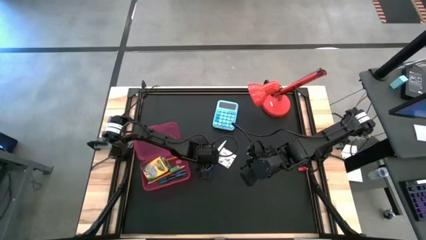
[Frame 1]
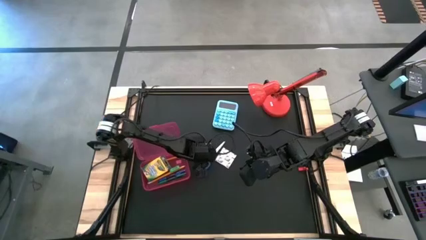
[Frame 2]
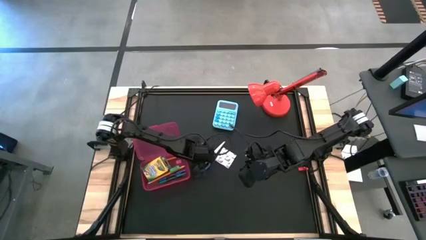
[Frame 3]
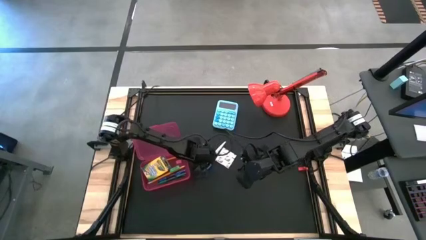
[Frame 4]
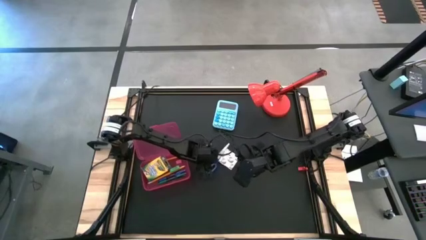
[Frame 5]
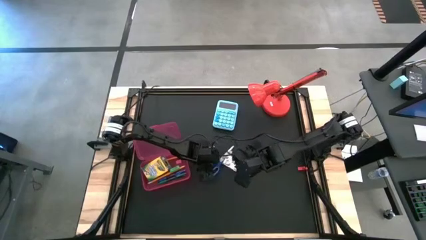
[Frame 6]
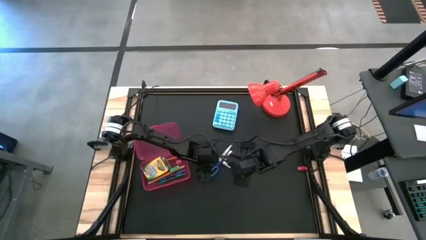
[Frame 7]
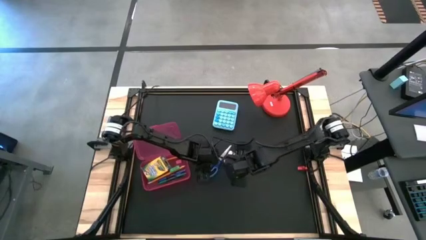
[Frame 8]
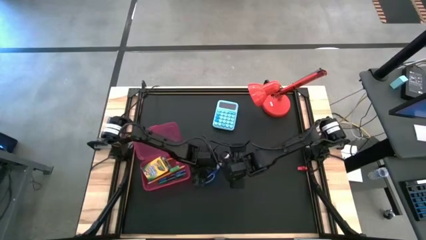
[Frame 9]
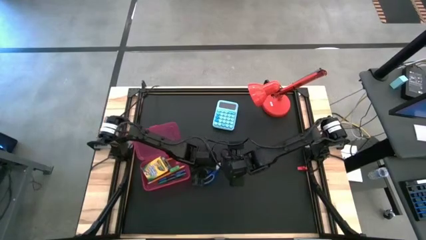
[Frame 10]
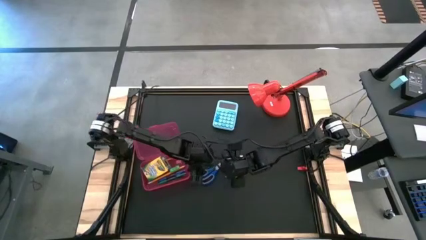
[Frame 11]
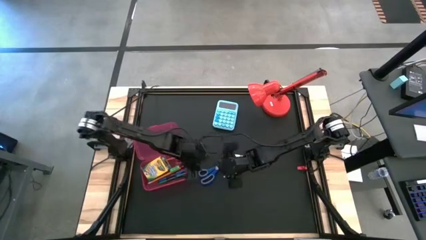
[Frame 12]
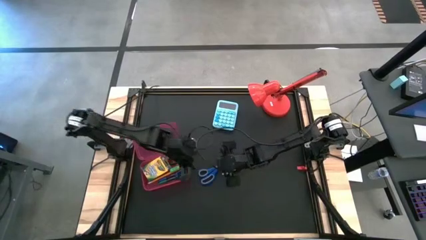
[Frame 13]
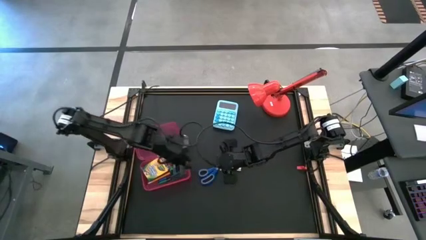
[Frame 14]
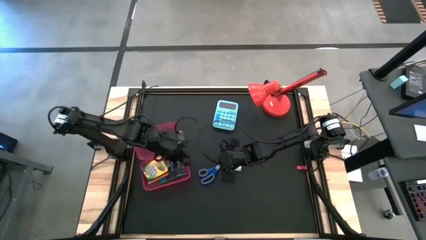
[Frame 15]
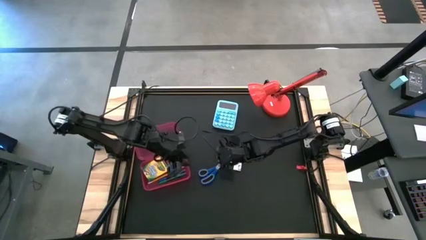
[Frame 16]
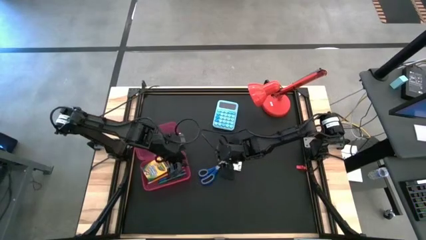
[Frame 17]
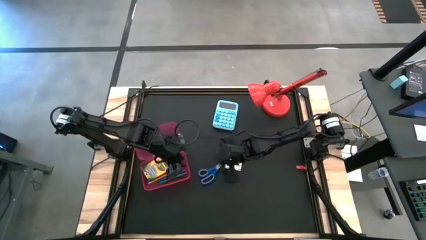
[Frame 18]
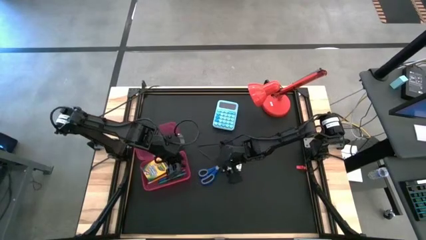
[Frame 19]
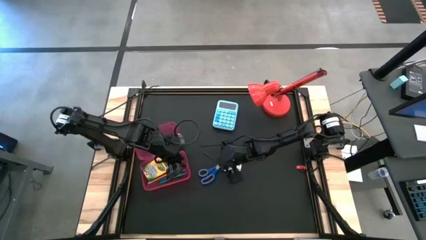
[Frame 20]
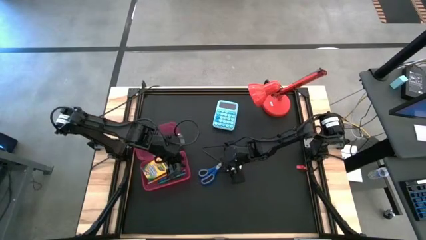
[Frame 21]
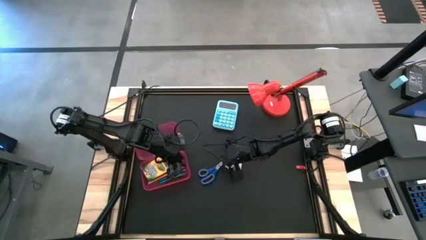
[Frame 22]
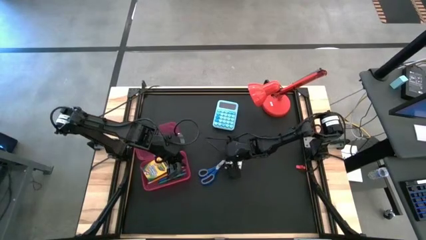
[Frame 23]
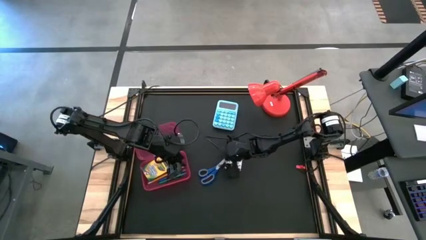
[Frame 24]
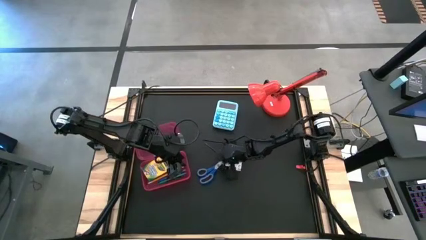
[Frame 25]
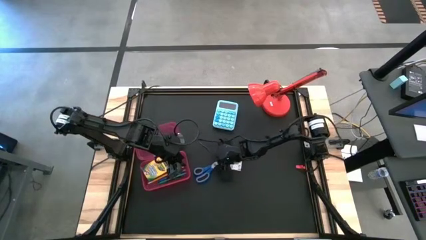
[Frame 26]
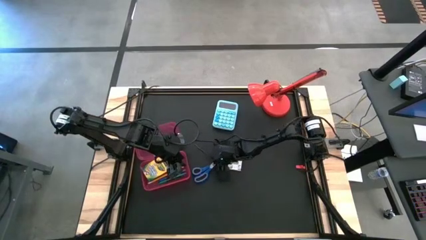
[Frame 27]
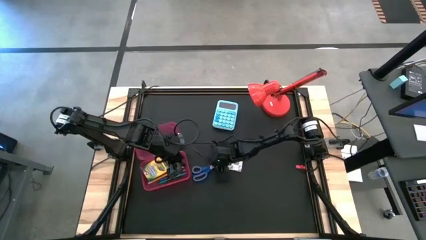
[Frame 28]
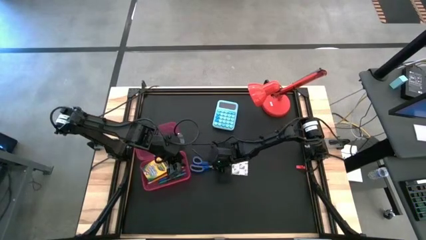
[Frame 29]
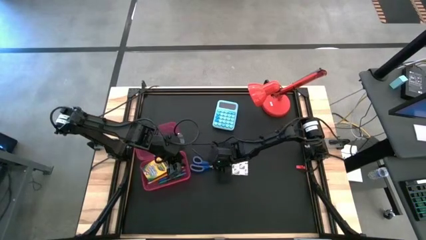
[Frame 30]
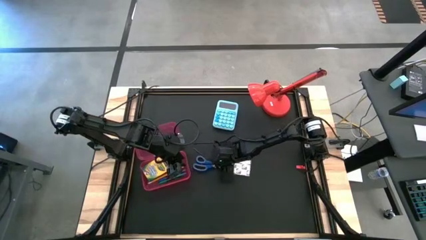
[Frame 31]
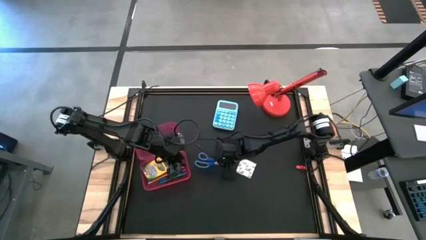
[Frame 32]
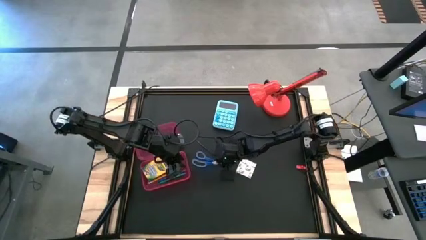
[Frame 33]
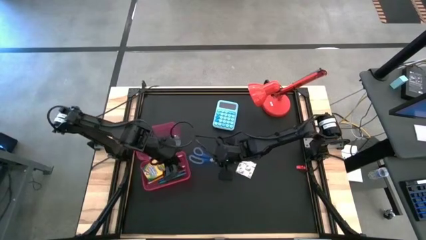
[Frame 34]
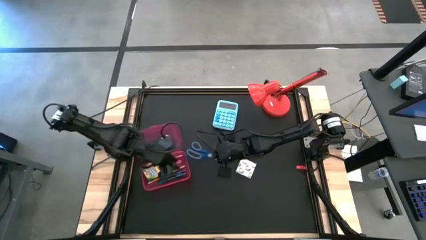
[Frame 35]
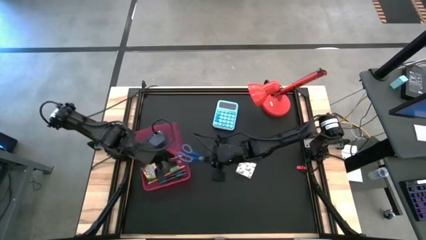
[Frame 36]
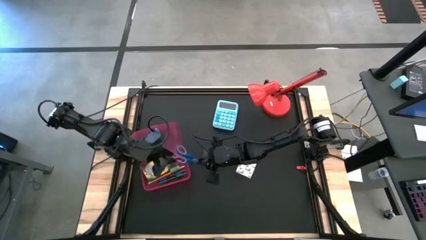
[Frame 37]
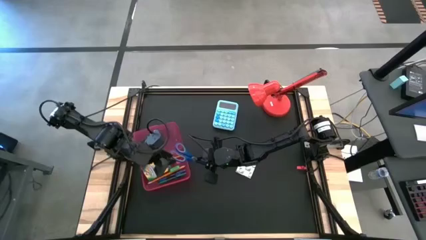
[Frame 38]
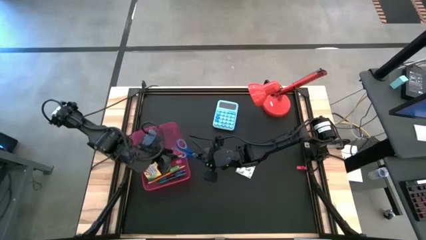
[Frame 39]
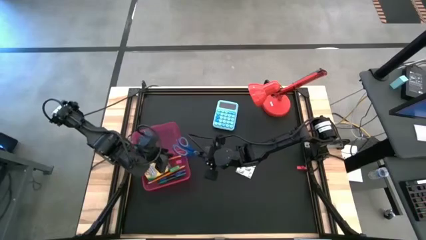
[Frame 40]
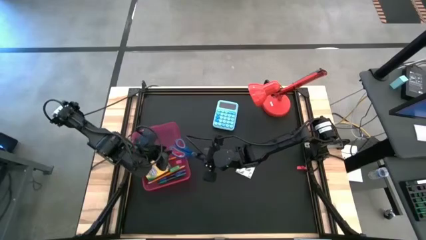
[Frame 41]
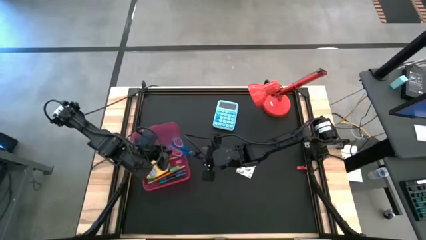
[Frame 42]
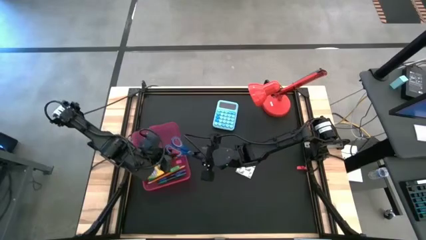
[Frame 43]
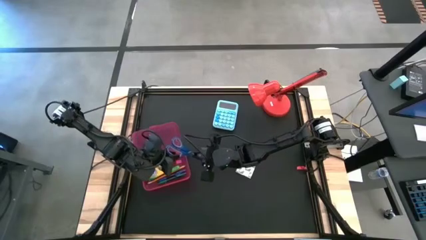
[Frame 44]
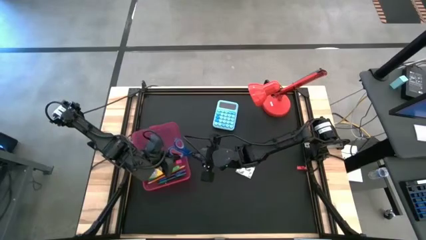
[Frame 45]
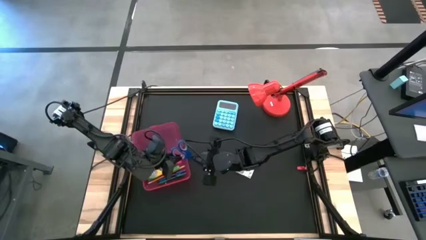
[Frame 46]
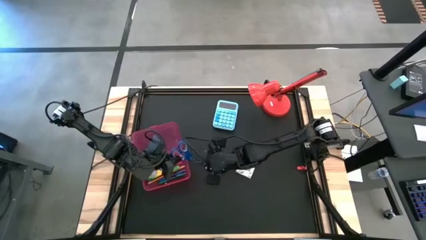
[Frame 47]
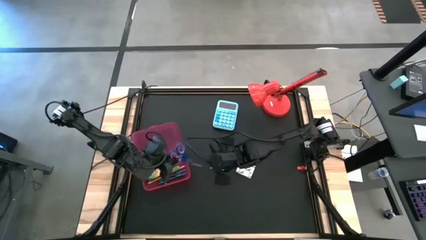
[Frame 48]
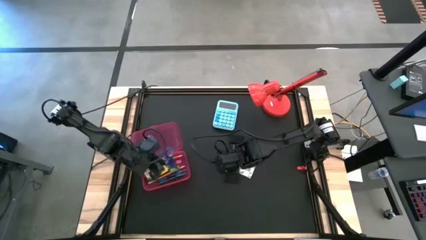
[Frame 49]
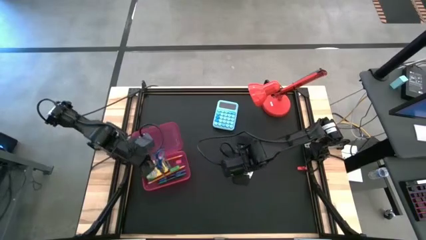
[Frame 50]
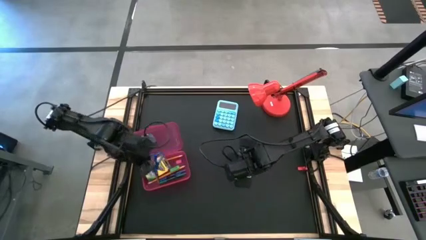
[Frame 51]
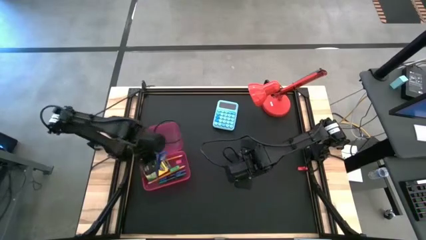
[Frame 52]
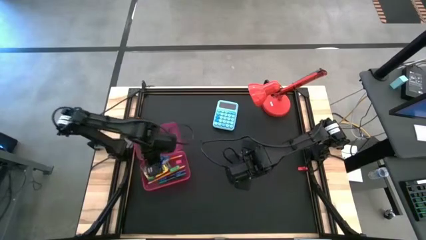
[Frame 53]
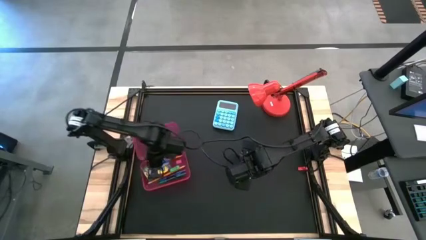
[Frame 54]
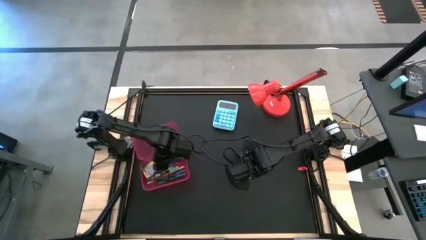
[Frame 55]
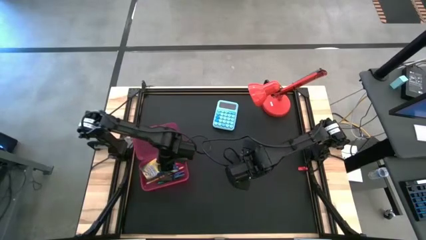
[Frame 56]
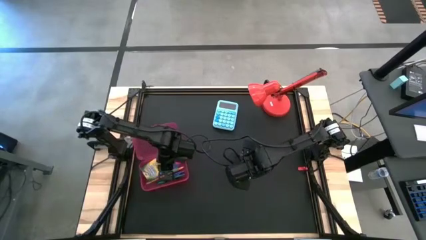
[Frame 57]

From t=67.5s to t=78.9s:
Task: Pack school essentials
Put the blue scissors into the red supply box

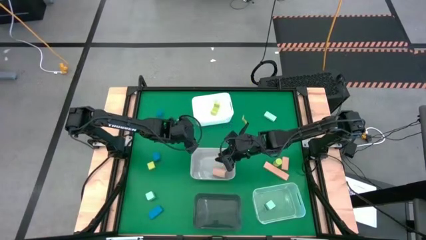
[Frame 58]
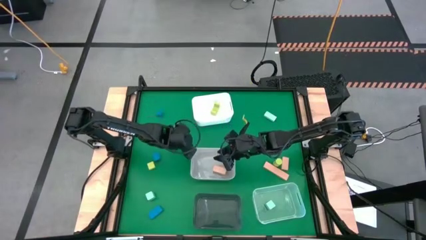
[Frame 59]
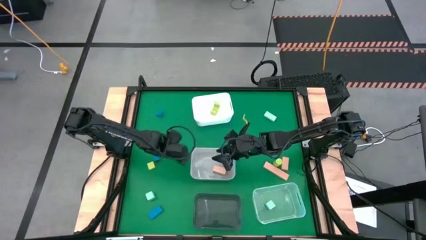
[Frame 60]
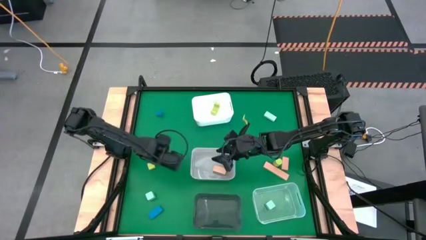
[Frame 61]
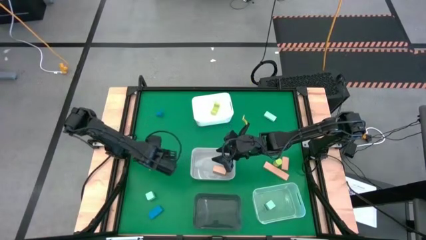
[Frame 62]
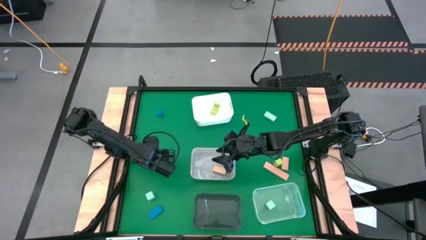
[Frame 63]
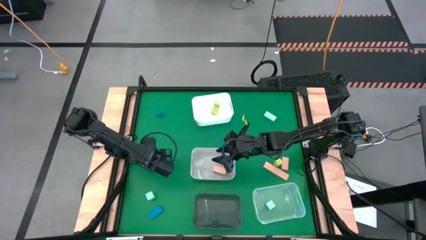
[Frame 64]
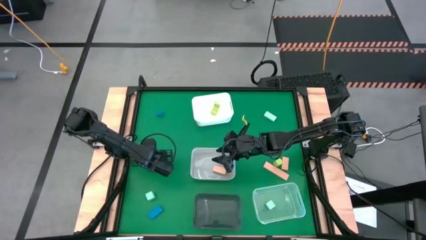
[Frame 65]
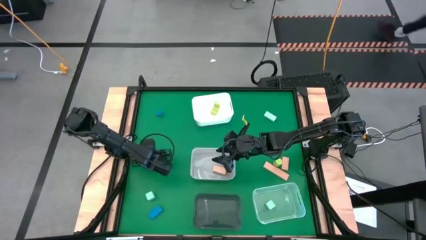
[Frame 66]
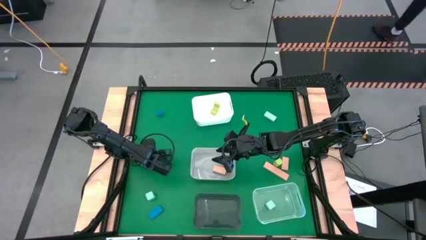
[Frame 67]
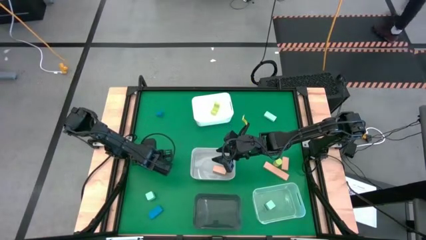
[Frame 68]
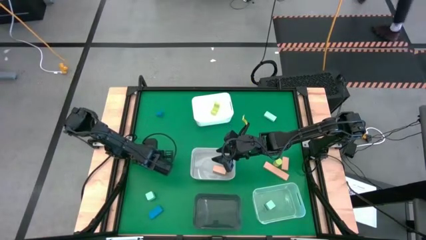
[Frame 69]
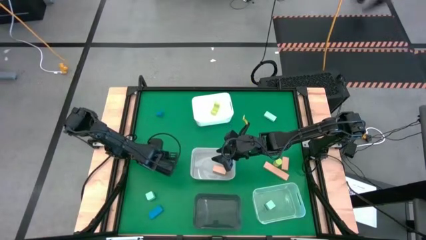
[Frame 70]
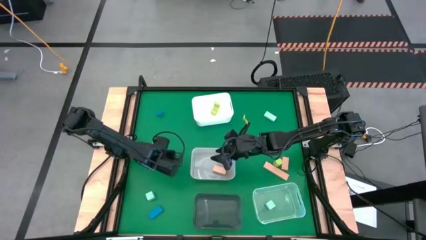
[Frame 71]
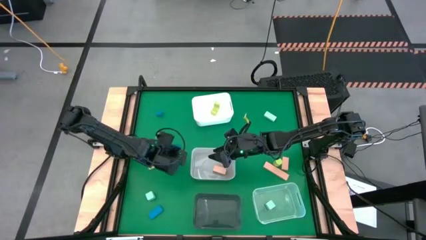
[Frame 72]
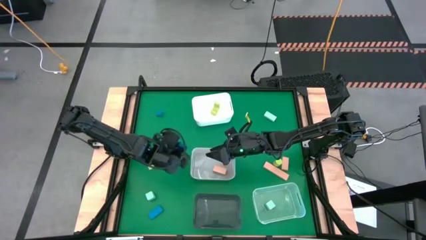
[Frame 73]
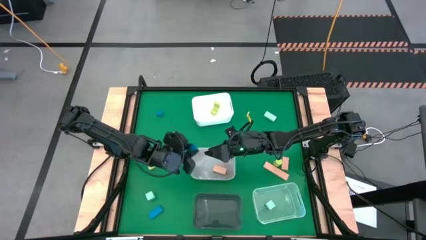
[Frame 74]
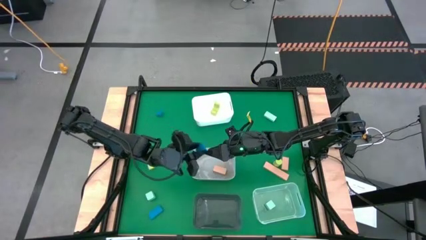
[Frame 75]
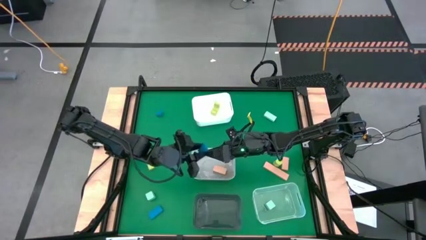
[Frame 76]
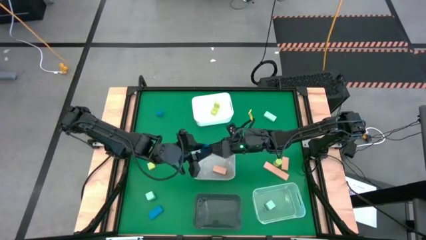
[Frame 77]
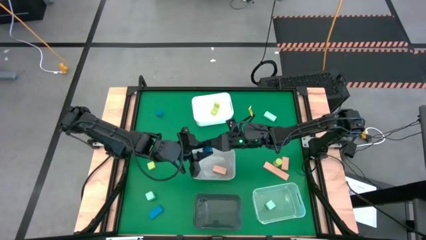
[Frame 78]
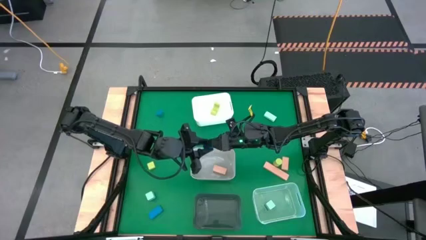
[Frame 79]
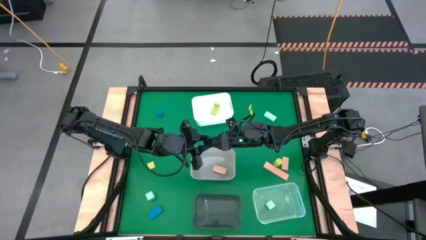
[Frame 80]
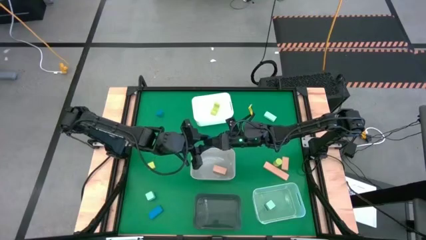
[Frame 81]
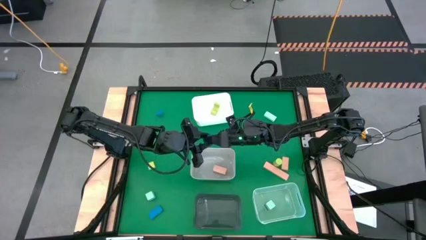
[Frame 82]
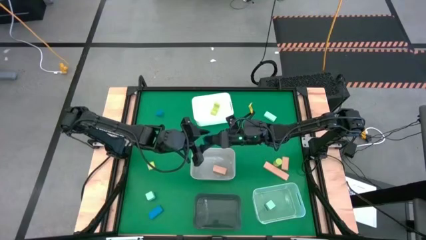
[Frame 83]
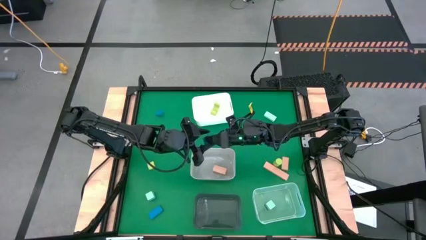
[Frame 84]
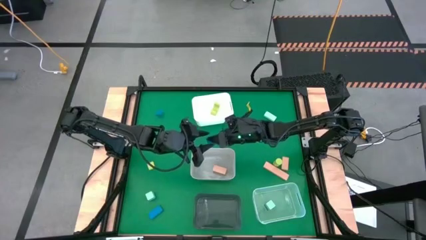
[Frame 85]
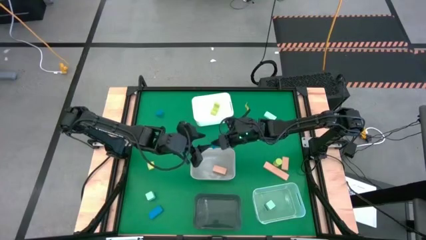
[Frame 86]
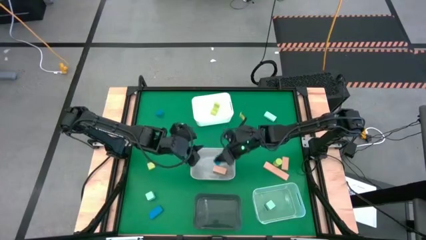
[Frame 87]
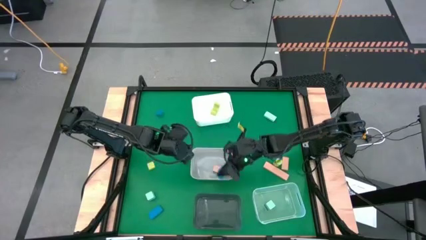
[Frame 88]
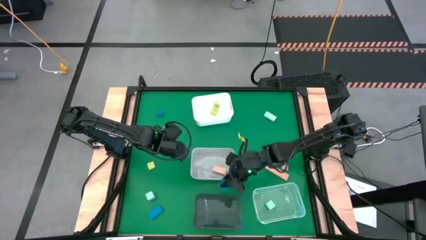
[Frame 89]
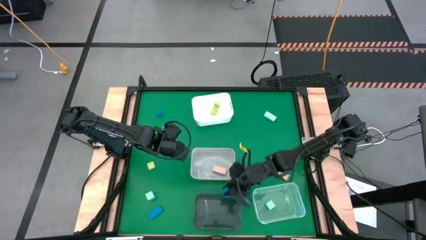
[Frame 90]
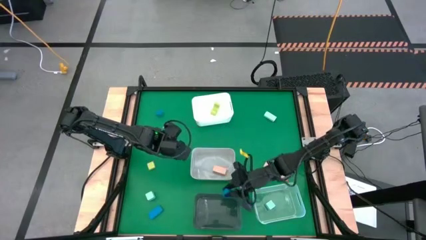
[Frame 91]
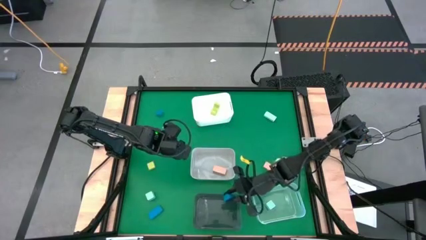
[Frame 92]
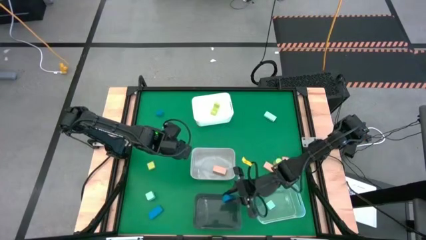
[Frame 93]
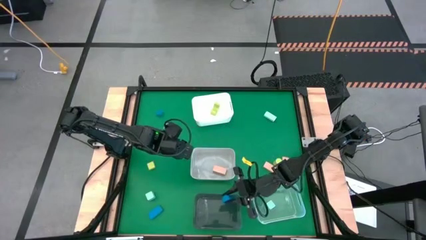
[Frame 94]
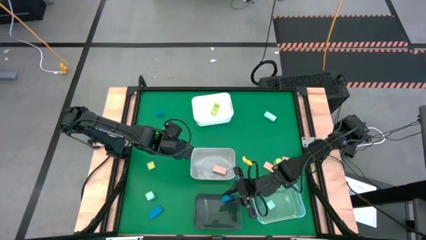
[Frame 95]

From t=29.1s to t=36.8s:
Task: Sort & place blocks by color
Put the middle blue block into the black bin
